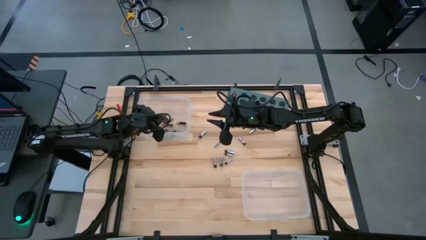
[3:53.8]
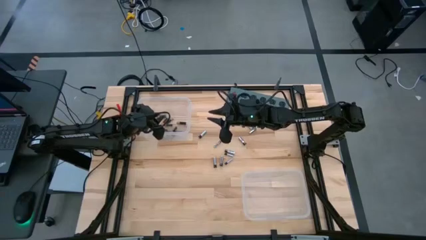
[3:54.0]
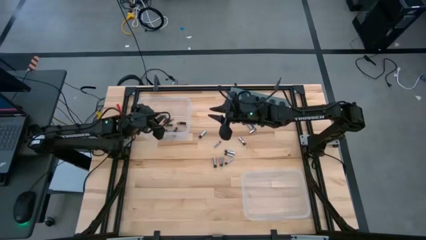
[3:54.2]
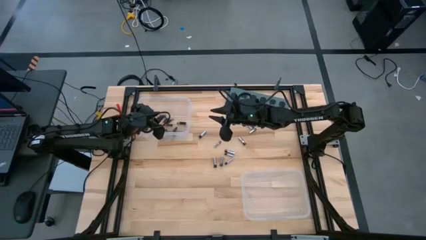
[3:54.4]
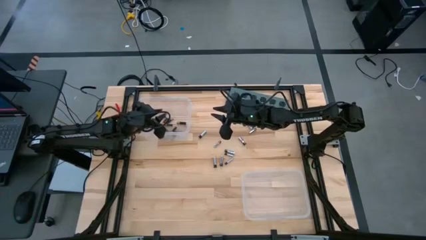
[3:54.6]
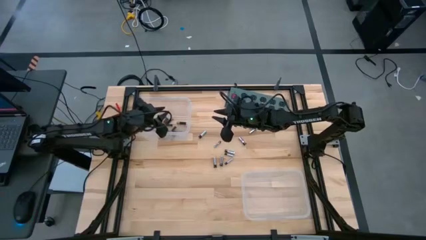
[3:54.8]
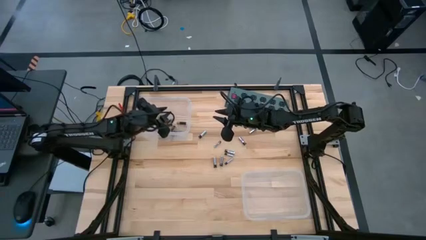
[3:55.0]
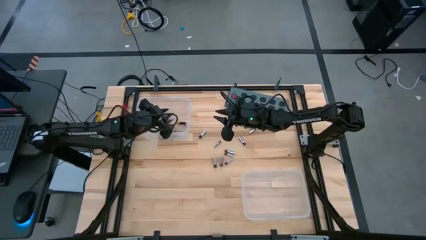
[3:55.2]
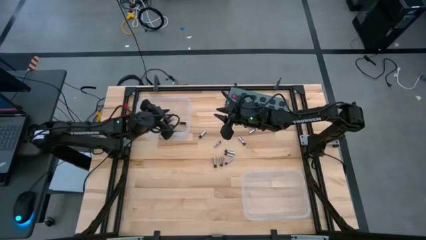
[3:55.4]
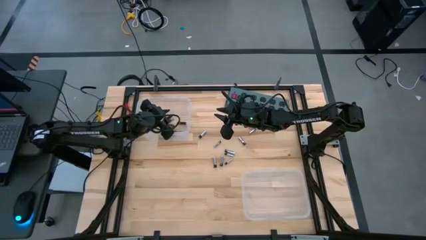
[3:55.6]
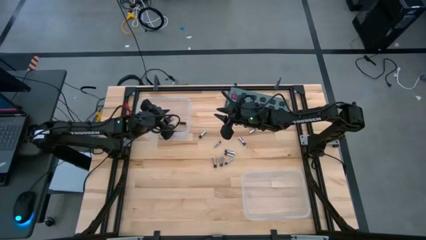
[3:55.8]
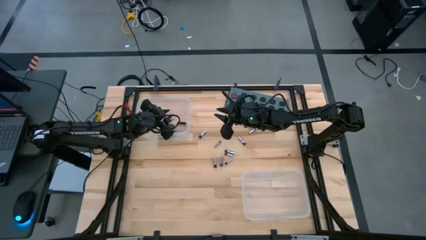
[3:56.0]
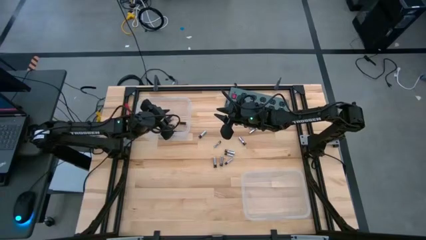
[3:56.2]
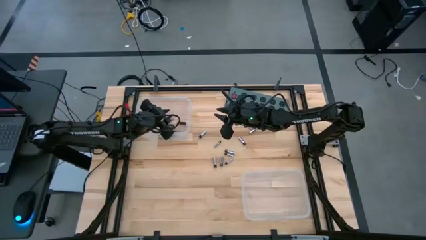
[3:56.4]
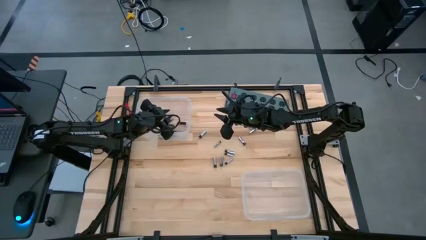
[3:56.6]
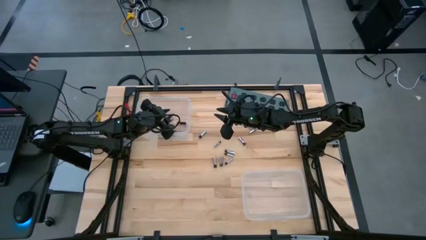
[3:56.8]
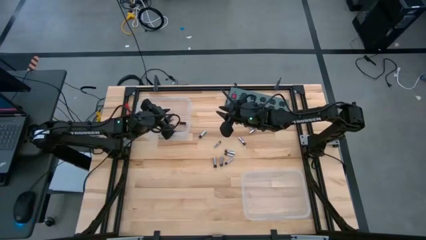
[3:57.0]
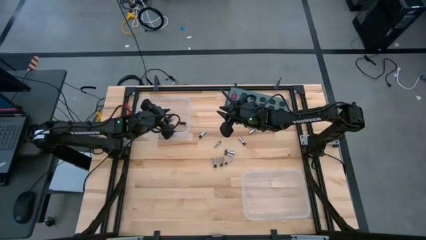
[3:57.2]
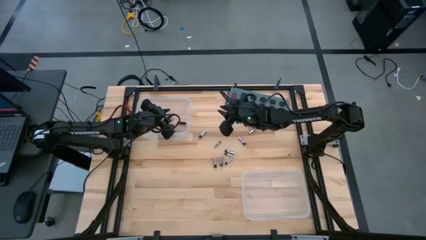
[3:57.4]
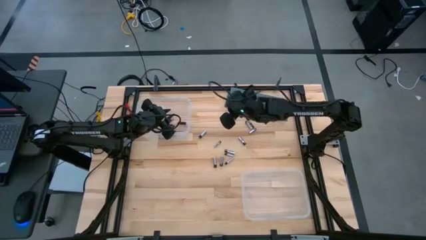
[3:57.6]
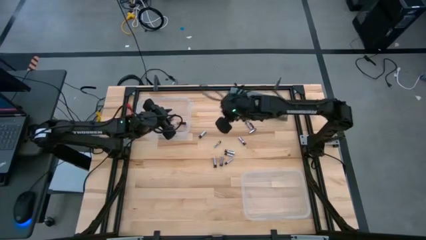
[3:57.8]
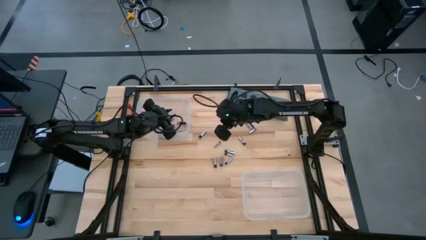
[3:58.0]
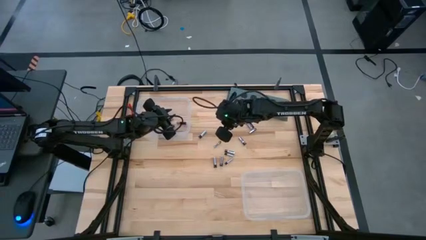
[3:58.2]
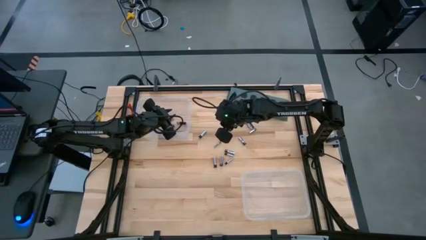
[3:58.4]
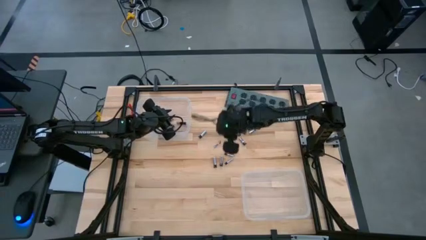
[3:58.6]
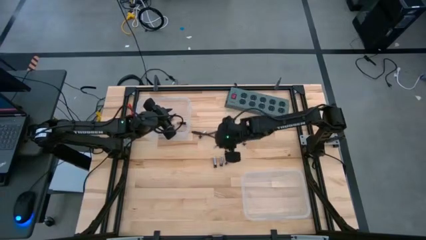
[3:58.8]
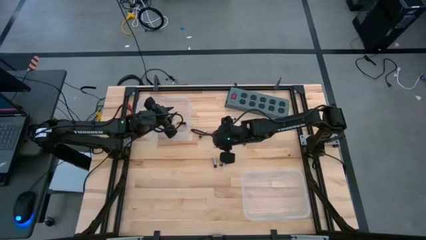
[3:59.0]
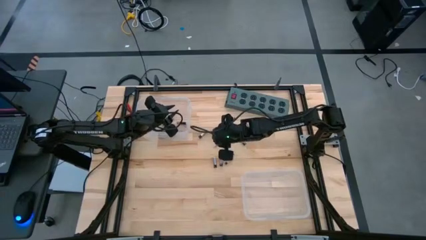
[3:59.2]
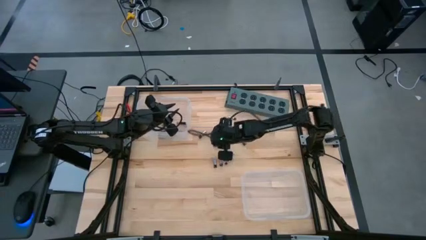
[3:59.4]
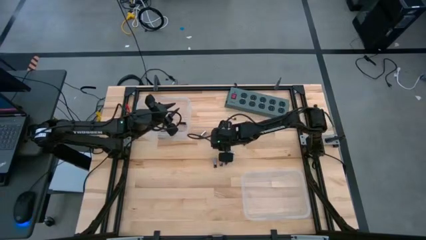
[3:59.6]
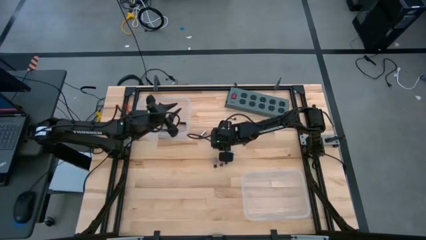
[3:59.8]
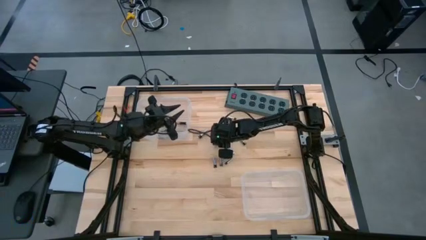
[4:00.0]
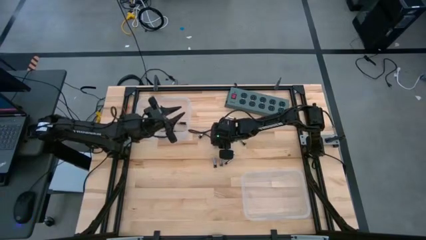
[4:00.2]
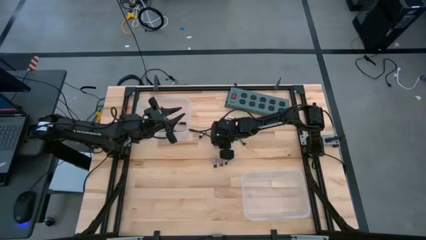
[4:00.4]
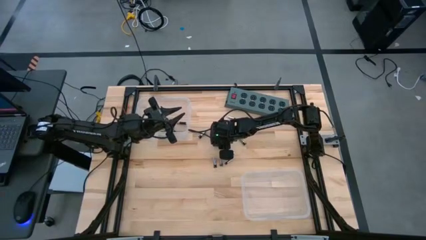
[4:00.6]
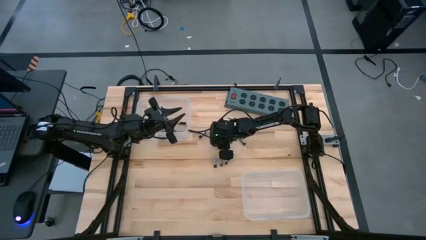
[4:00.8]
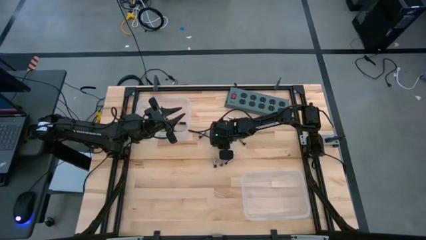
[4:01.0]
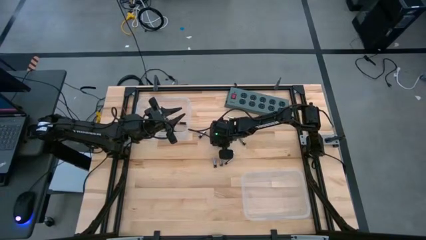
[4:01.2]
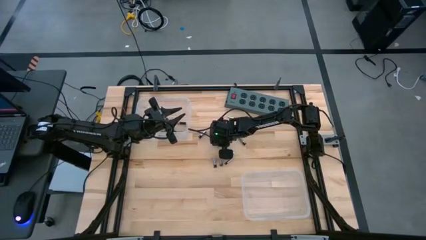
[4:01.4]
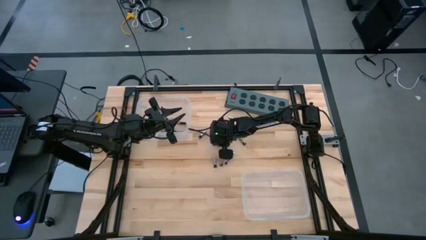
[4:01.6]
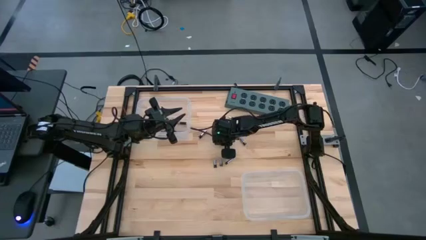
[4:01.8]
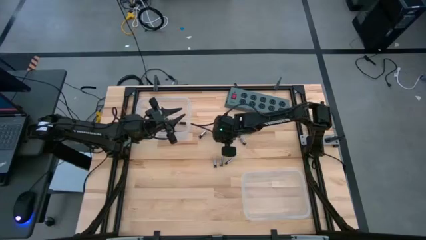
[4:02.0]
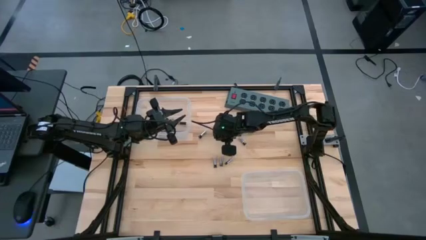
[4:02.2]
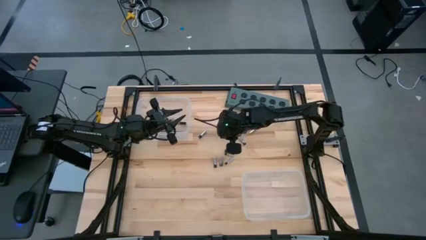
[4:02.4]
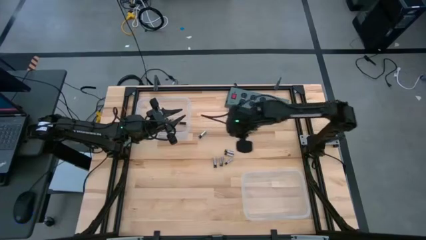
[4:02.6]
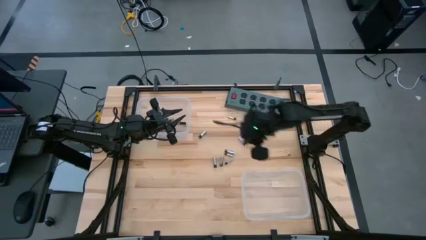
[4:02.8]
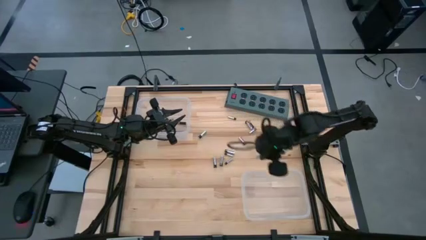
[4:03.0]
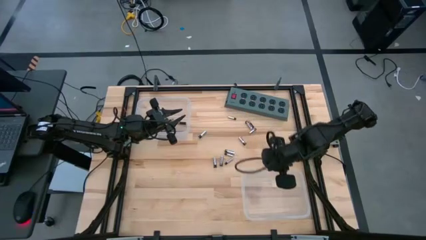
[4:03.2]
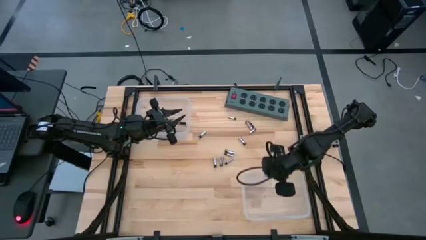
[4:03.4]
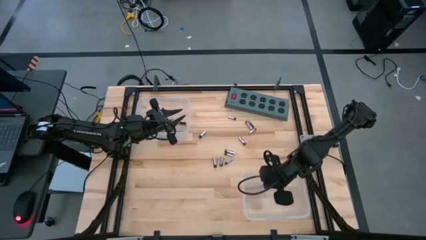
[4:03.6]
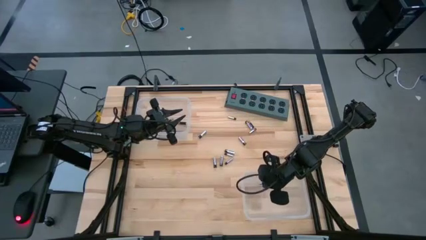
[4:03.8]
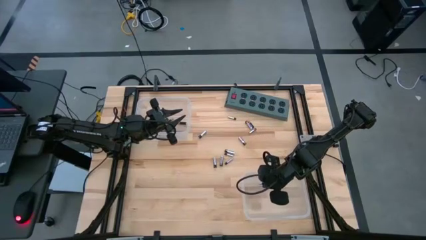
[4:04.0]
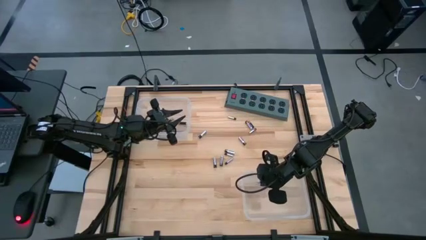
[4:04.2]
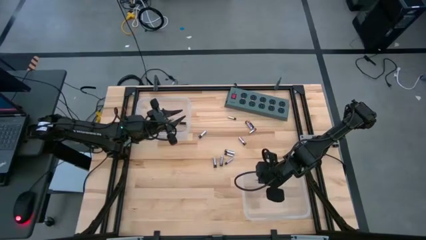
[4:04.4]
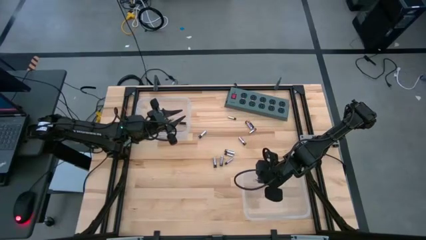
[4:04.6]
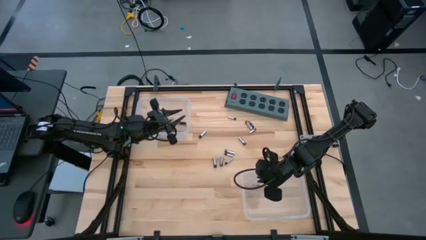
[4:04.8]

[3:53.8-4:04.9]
Task: Sort batteries
Put the silver battery into the bottom transparent bin

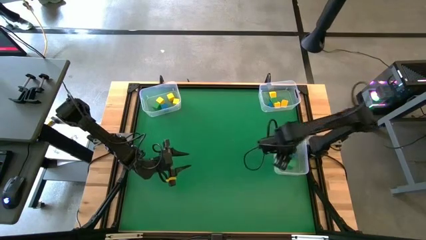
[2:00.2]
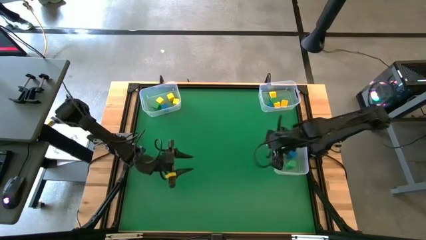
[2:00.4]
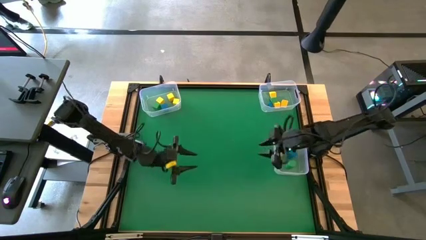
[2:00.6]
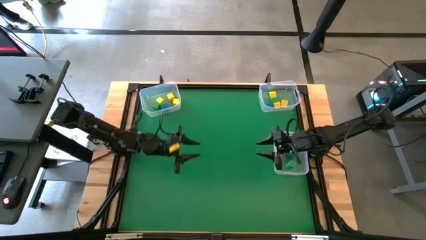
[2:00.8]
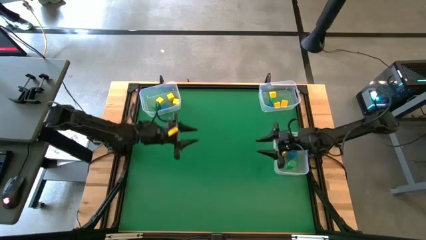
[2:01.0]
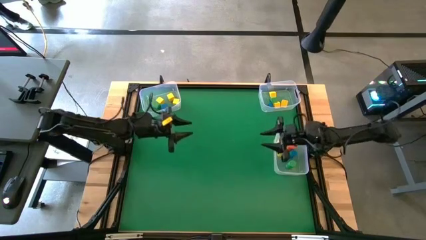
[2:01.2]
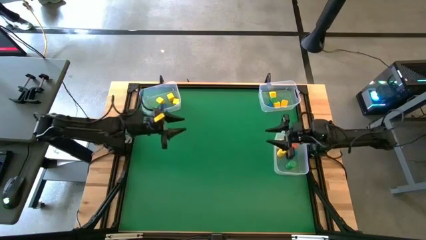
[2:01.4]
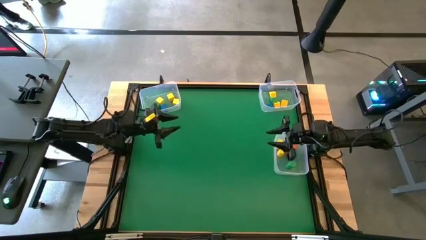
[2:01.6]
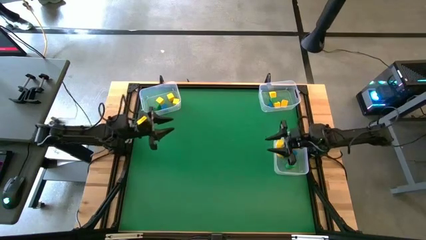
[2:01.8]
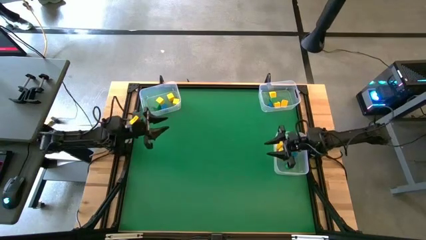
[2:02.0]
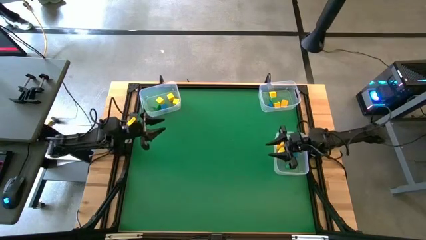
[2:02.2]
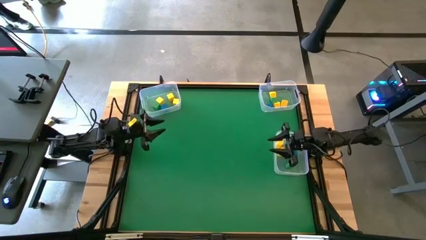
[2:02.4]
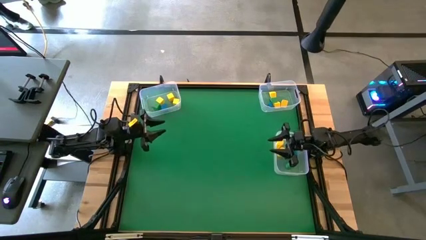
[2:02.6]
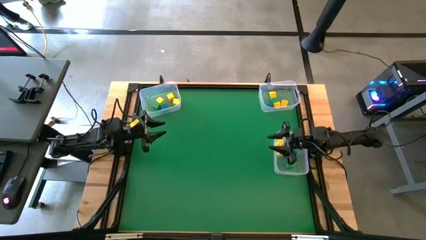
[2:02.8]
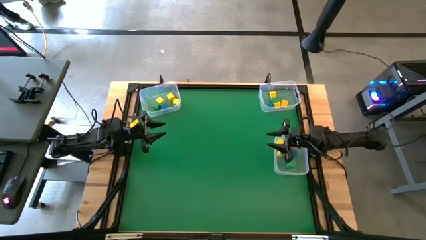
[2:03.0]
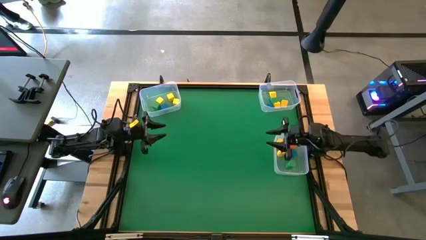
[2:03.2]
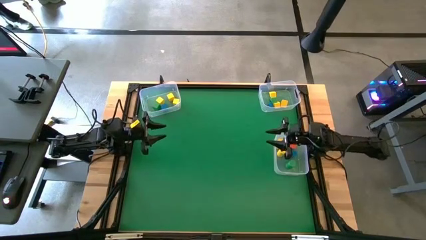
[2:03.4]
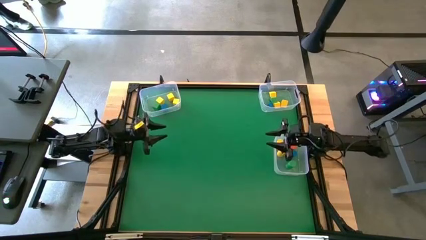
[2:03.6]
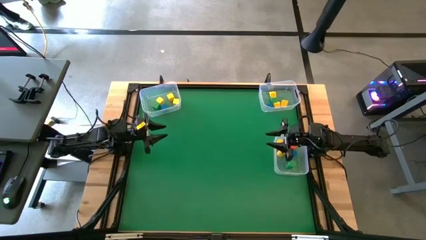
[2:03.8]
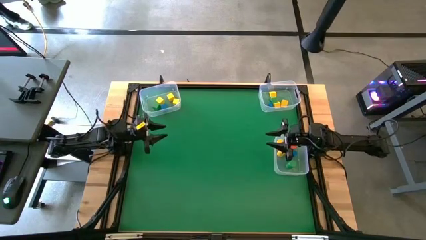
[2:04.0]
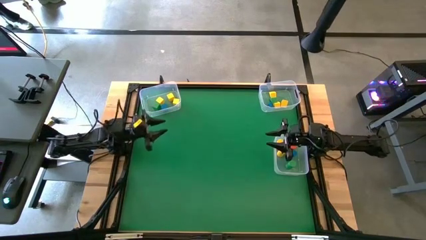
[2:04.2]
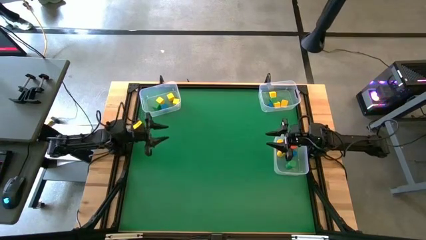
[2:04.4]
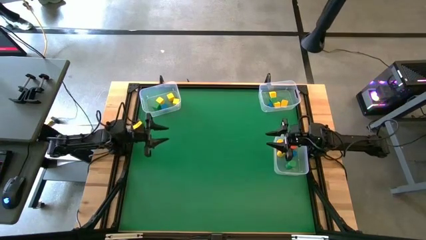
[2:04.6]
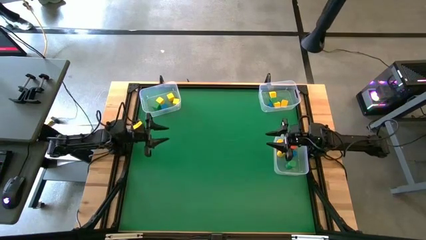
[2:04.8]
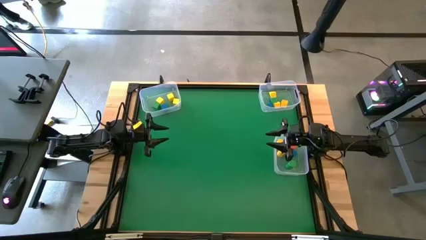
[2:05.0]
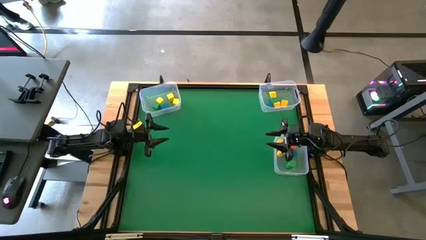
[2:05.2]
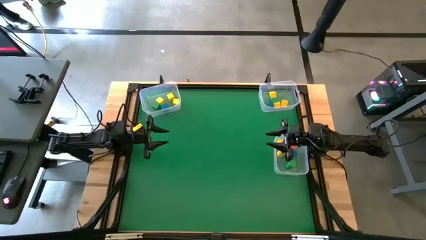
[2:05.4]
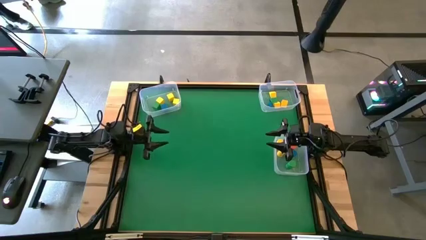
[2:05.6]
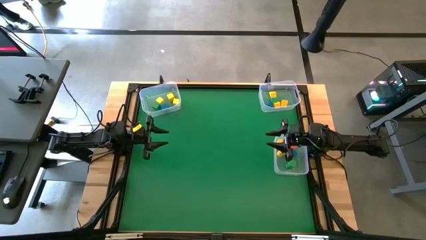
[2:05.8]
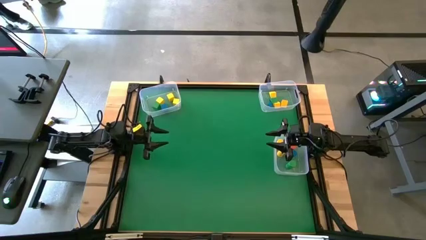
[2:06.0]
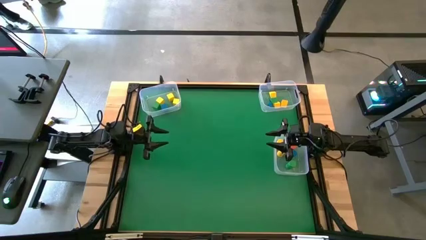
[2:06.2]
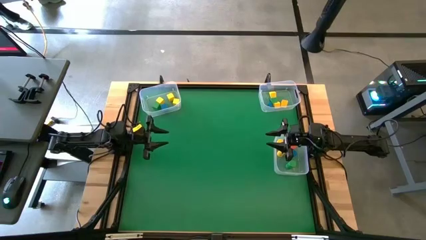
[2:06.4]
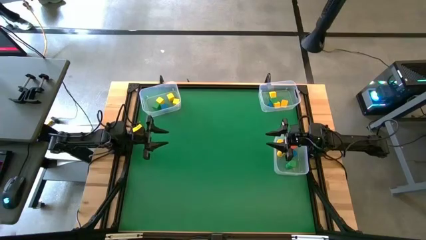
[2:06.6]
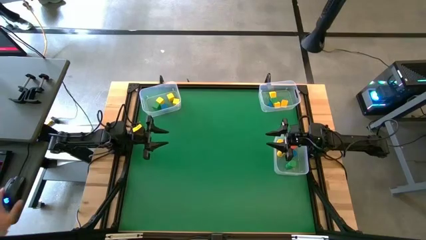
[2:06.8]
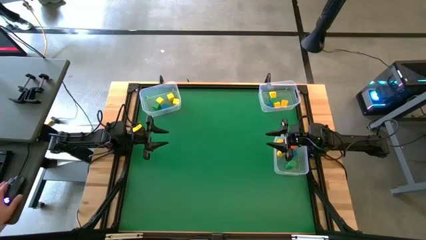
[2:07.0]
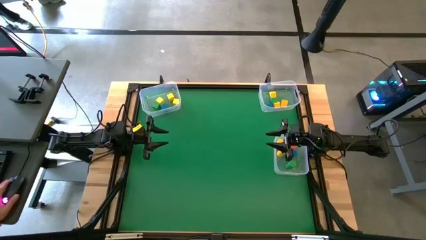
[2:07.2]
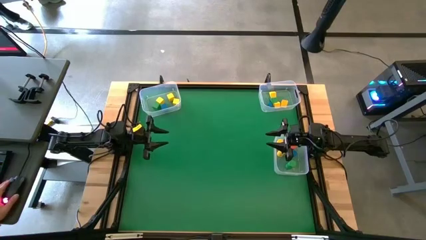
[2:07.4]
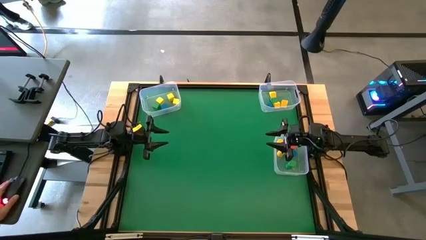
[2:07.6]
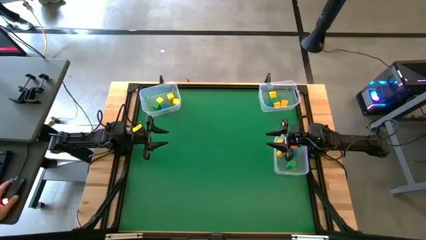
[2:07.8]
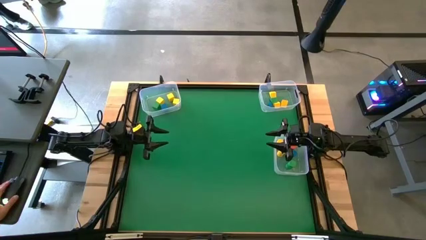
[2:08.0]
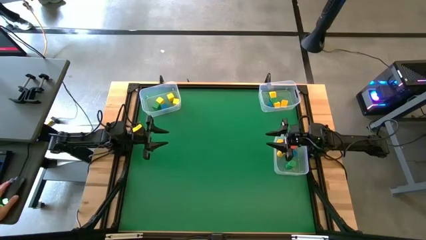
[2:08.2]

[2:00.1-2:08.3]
Task: Sort blocks by size
Return to Home Position
